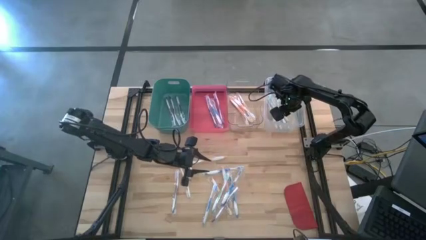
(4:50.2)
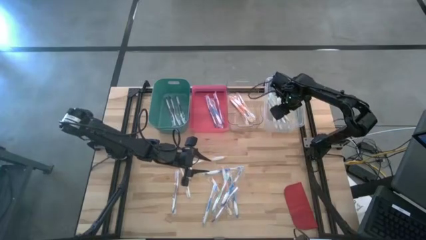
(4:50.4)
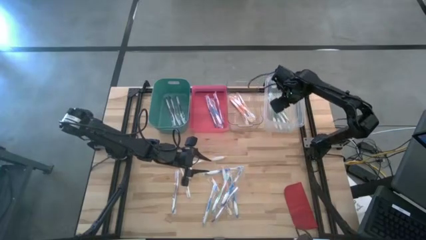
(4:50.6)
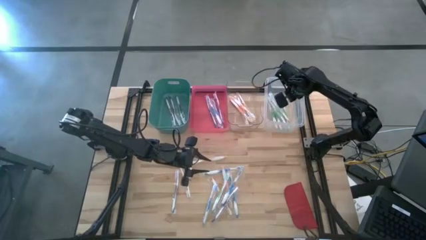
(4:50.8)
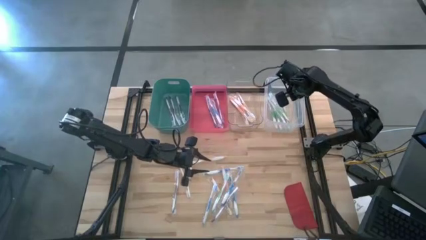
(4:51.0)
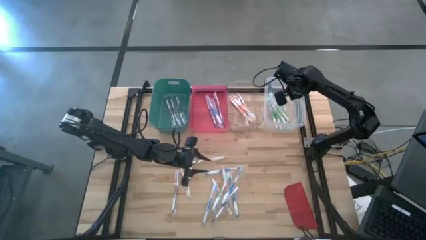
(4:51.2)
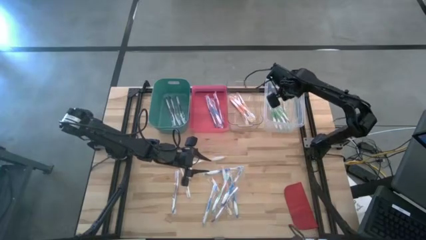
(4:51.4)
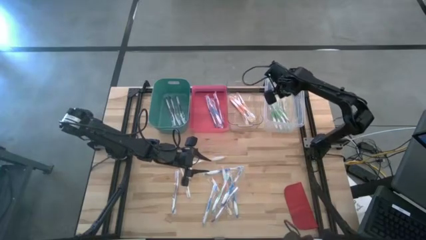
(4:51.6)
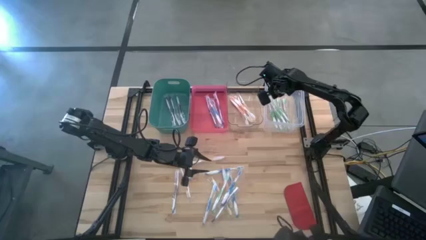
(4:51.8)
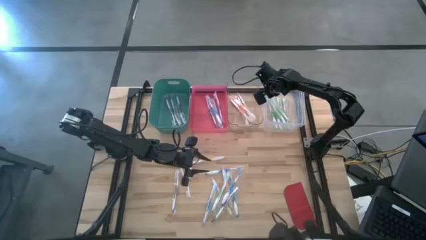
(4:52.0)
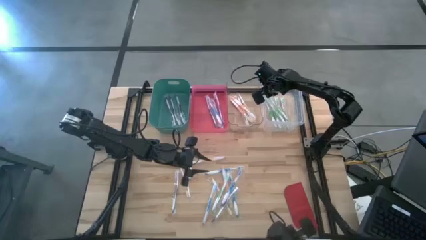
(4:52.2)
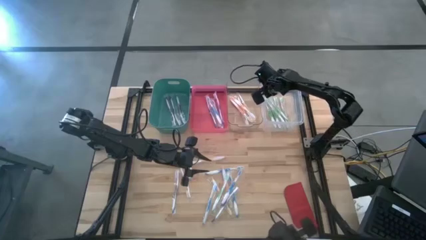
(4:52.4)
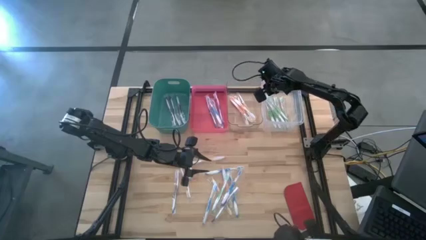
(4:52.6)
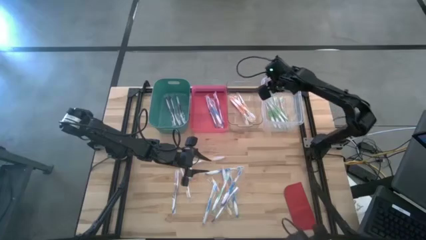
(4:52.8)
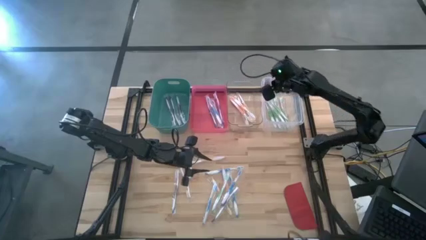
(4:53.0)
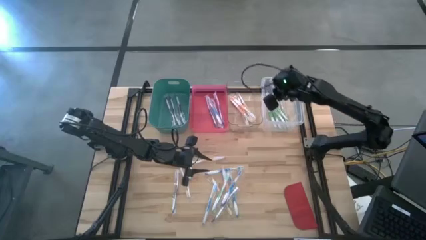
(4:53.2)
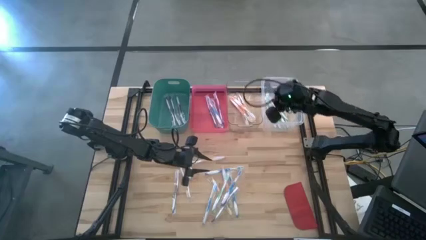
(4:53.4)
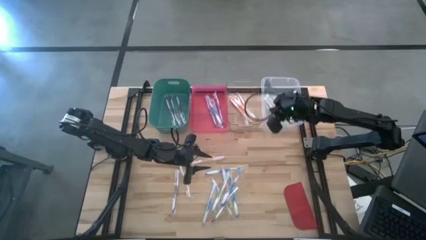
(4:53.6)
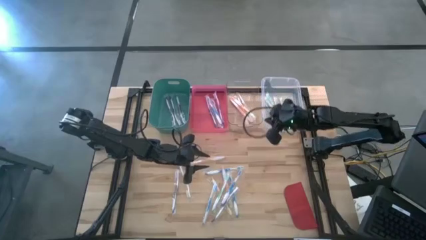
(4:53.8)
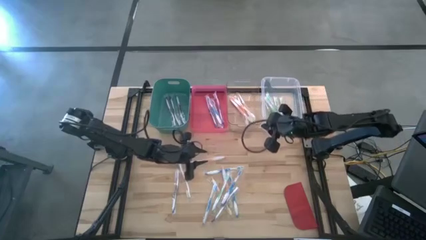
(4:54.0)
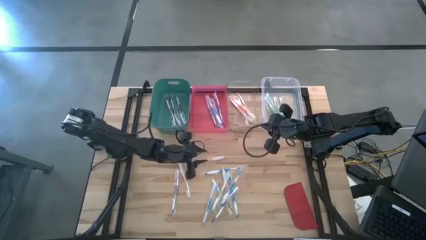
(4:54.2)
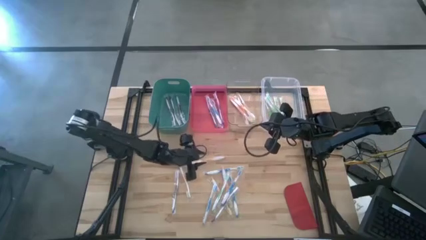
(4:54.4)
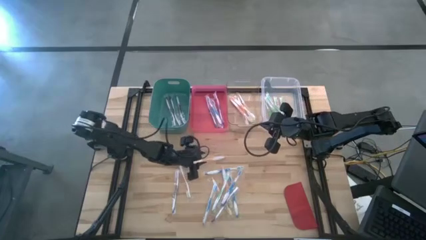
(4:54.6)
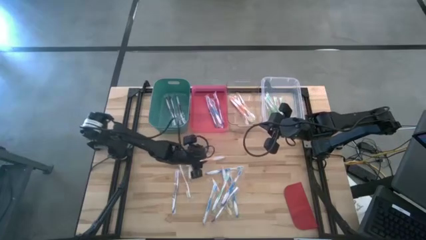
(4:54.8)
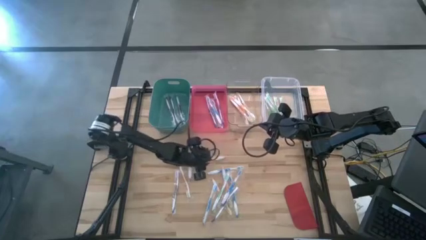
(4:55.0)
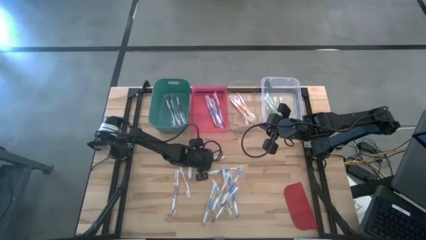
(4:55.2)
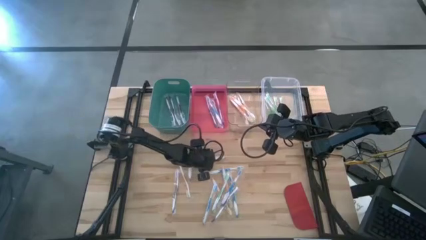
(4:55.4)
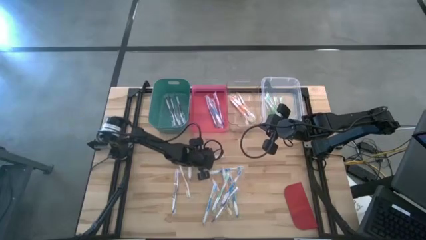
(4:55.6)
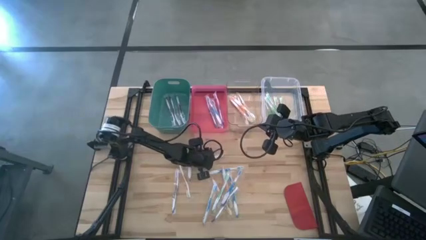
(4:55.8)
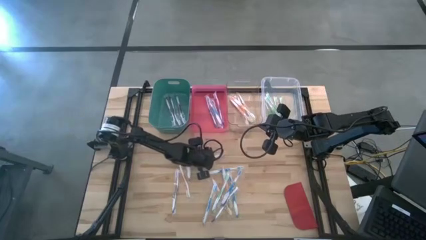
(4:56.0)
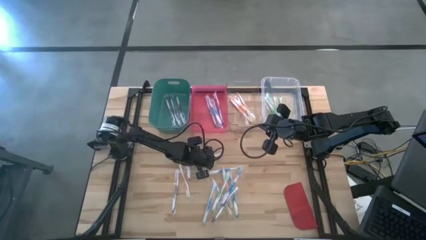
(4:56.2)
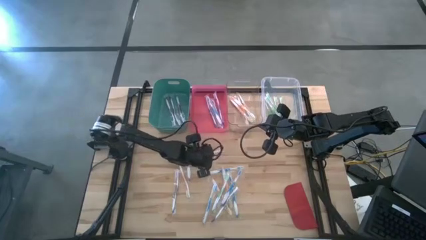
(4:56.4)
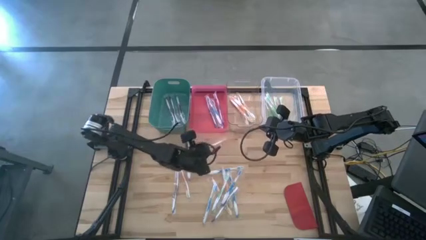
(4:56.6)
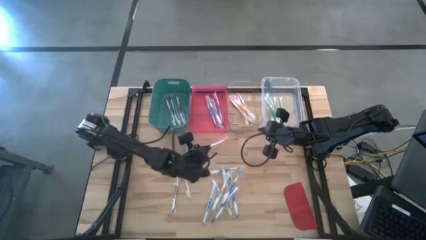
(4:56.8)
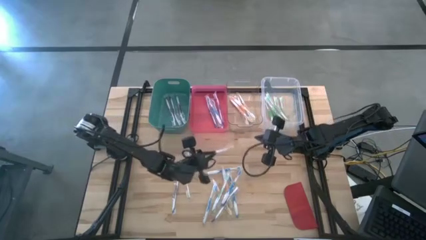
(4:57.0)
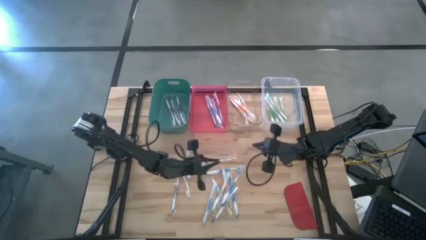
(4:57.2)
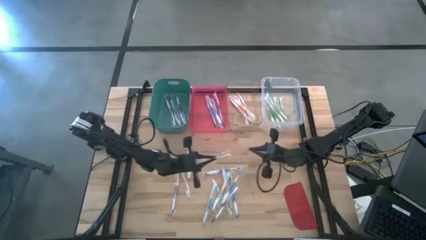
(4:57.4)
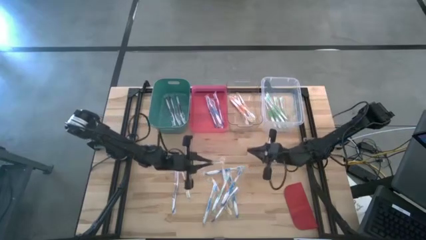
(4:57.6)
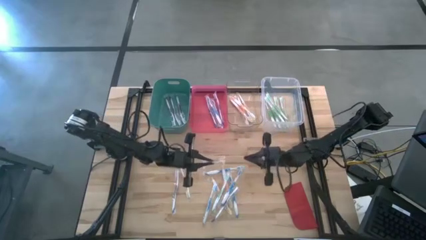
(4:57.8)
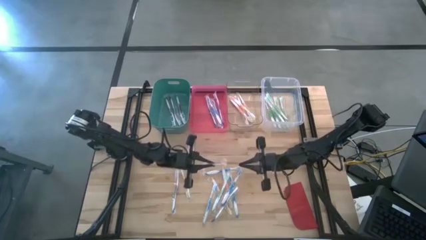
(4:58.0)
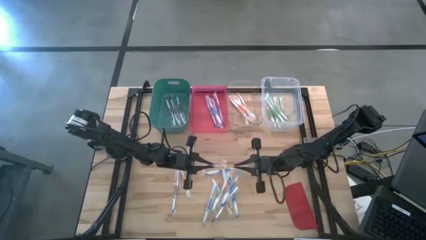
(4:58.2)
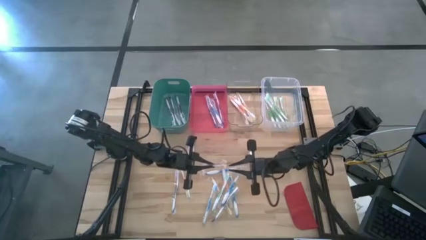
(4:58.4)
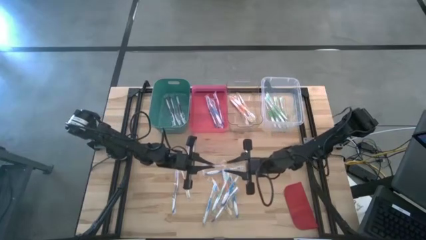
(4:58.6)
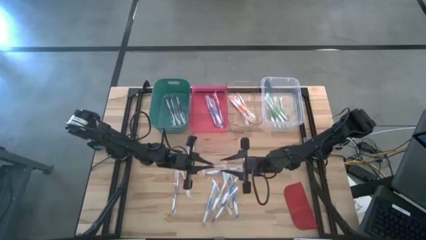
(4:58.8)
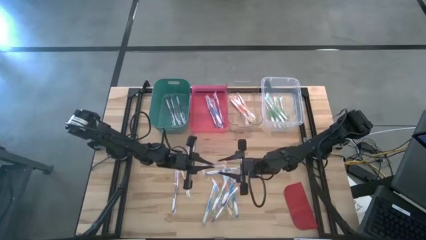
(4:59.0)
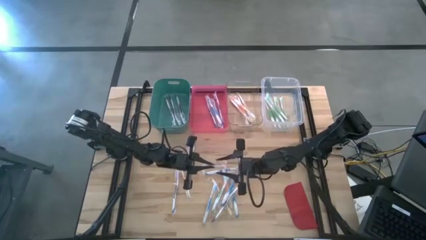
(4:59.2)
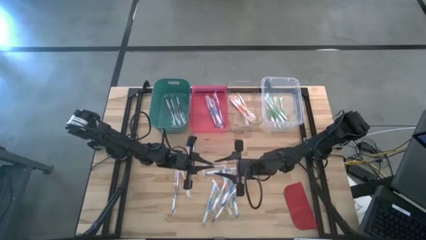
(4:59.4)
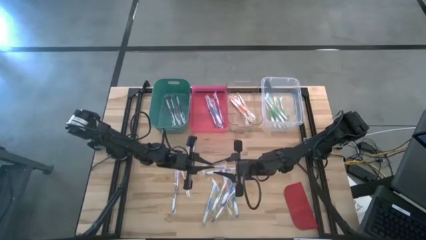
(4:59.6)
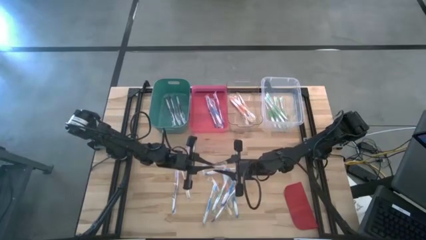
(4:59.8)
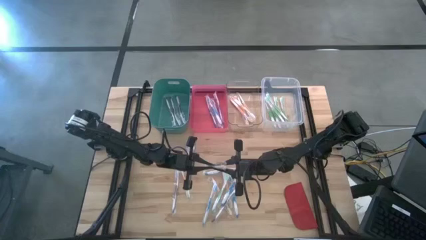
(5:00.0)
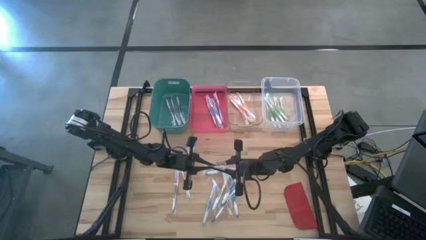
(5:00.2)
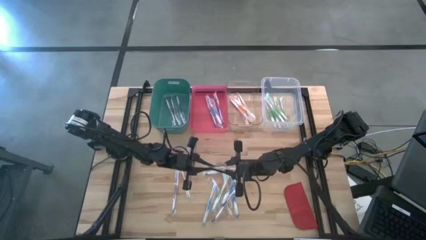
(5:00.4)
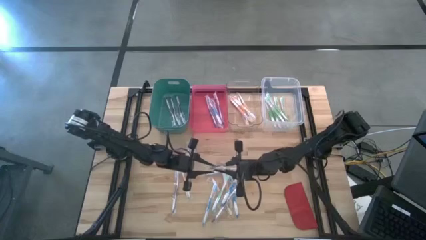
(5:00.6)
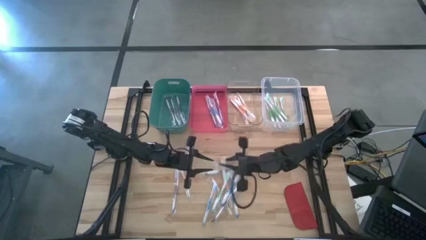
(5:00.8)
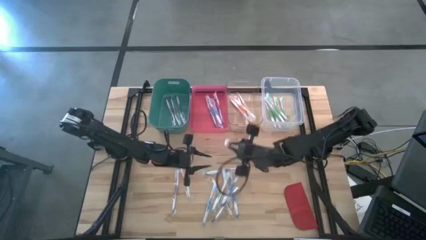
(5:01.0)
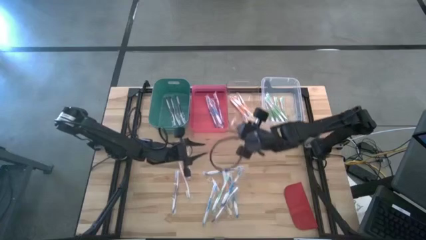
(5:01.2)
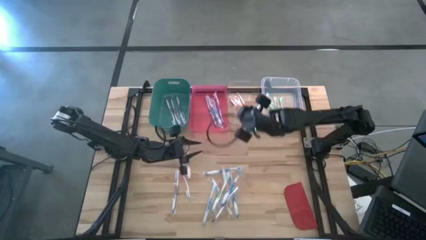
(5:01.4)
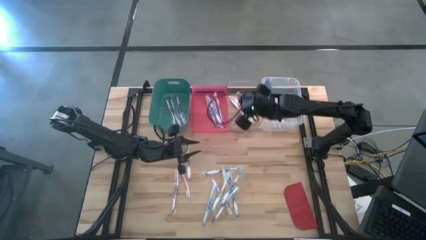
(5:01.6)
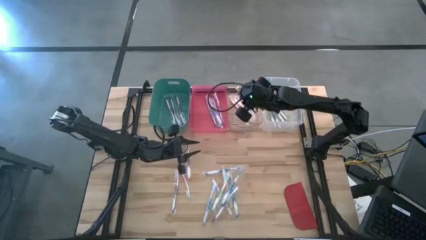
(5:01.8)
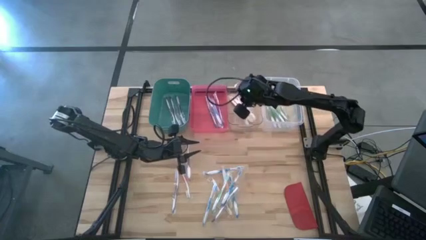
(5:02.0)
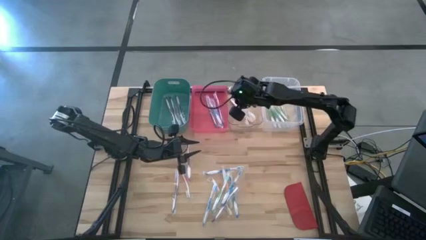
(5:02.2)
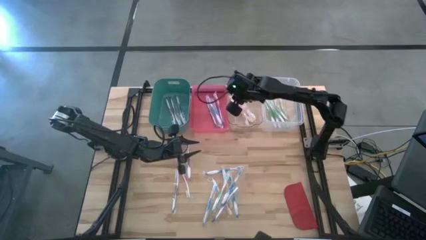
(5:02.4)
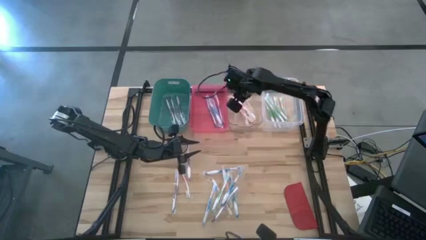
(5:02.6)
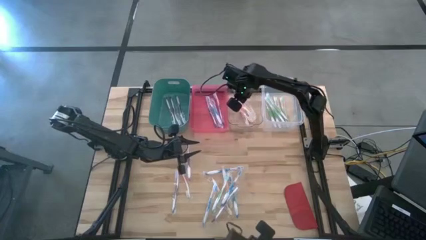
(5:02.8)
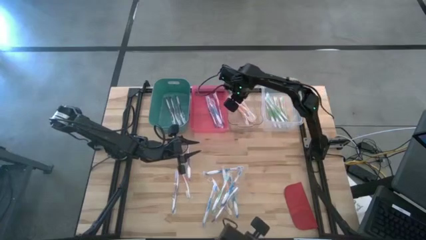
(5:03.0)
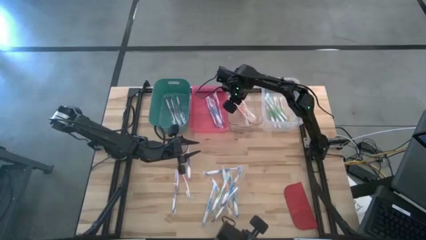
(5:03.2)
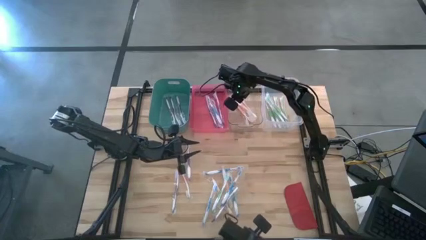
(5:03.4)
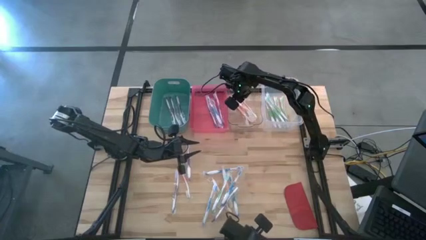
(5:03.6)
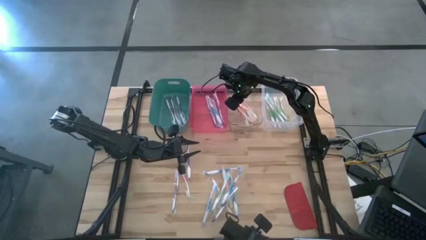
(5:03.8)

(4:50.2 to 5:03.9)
Task: Pick & Place Toothbrushes
Put the orange toothbrush into the transparent bin

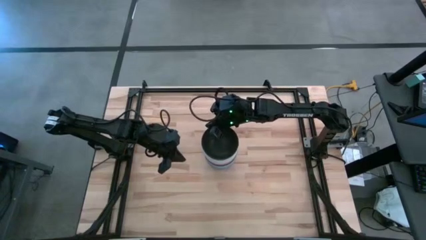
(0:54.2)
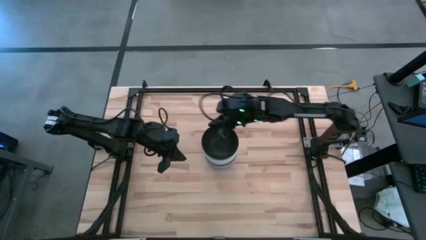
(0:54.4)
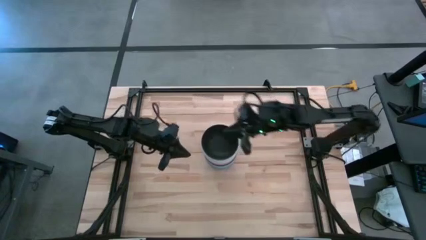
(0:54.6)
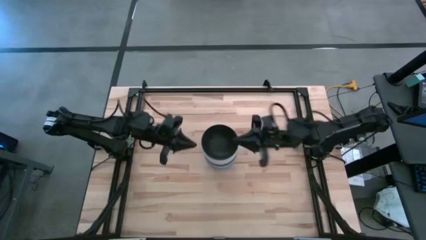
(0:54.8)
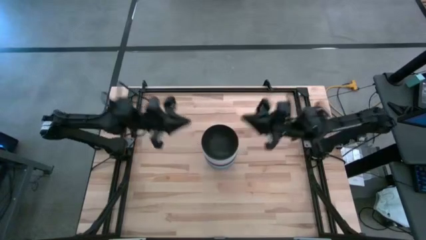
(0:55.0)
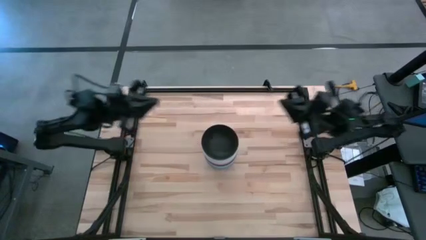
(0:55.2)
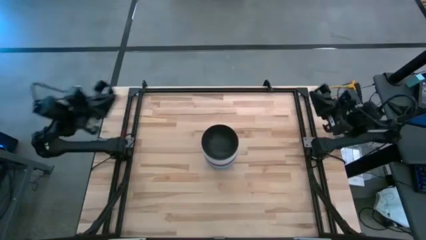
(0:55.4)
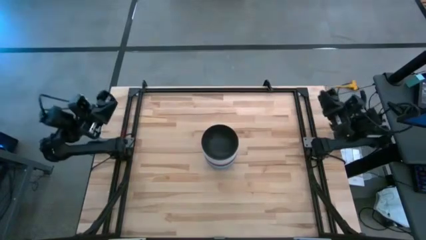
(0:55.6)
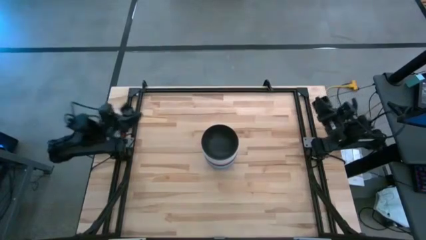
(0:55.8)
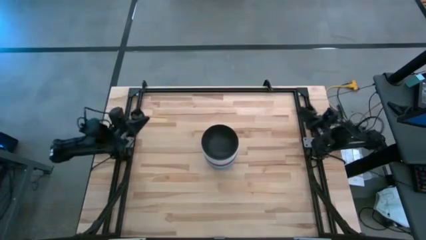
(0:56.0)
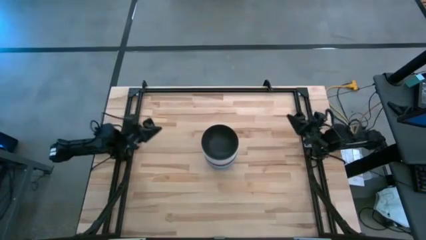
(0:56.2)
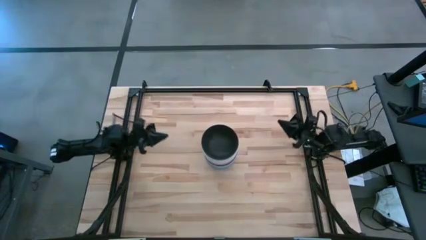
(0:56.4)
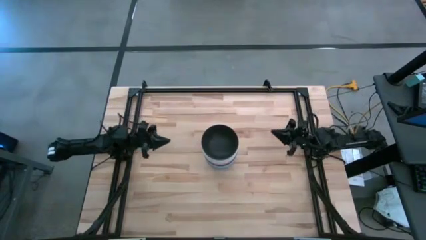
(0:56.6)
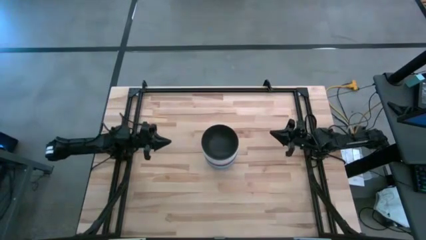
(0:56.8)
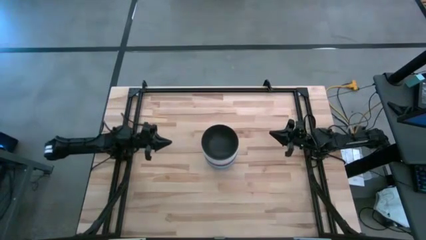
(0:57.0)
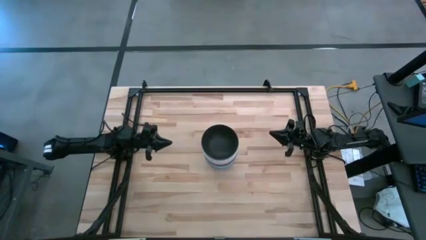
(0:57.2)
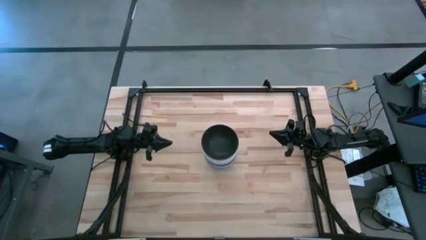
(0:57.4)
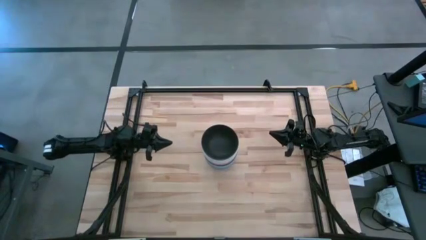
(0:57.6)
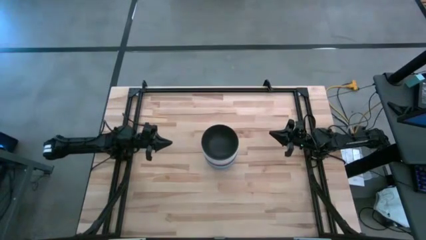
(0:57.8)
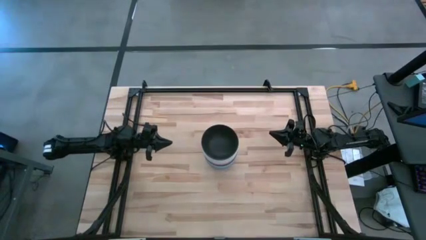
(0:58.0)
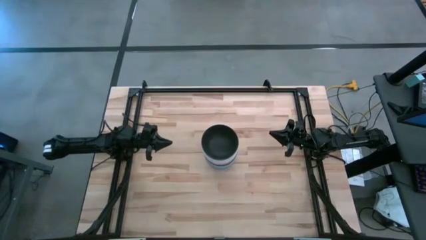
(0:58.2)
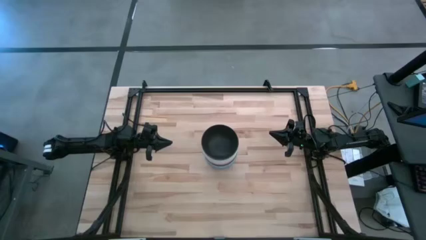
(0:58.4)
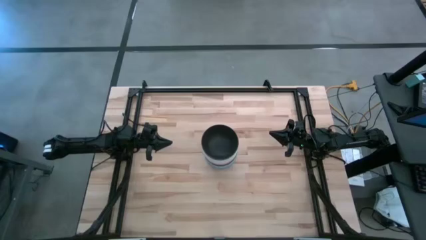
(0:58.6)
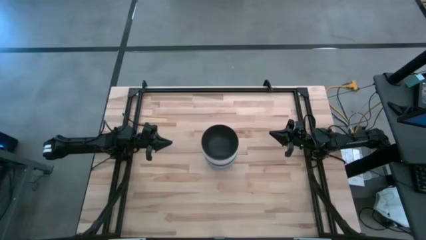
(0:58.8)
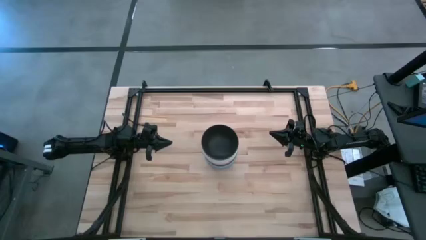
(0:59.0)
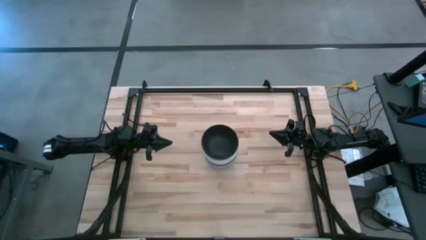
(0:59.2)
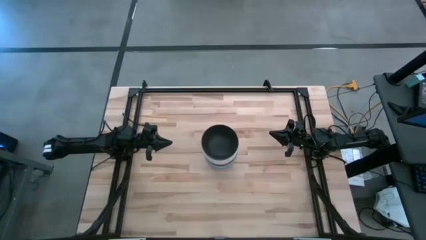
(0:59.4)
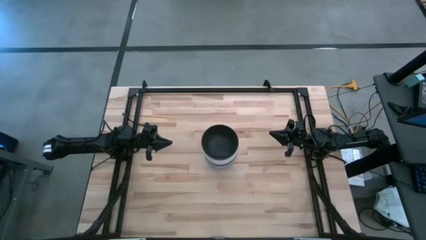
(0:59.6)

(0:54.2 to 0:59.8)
Task: Nest bowls inside each other
Return to Home Position
